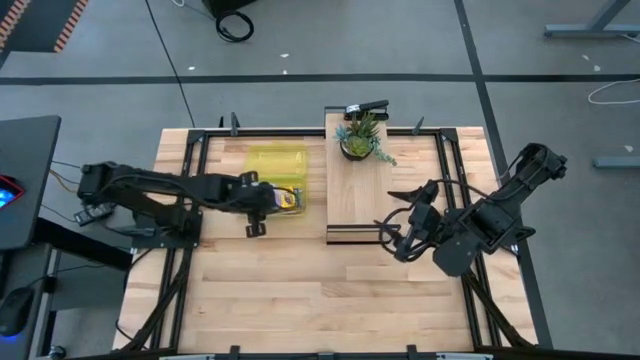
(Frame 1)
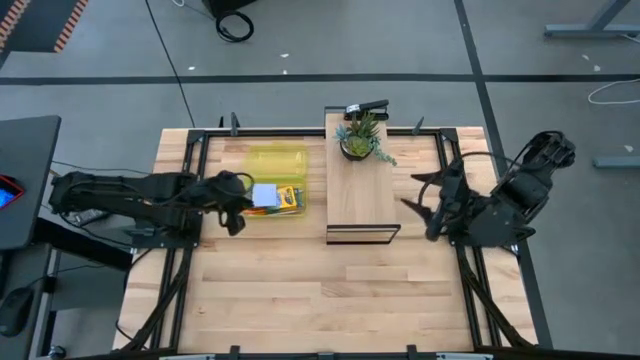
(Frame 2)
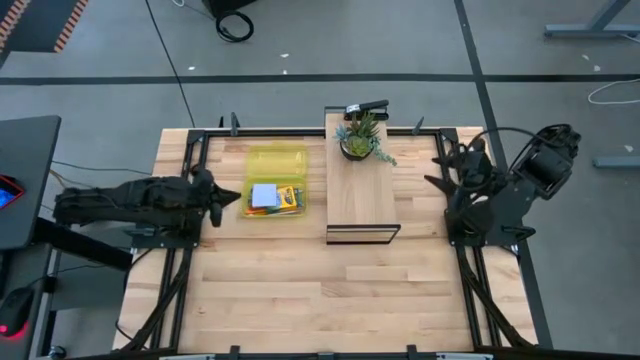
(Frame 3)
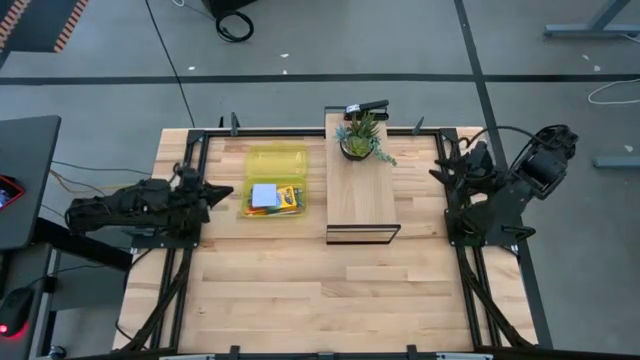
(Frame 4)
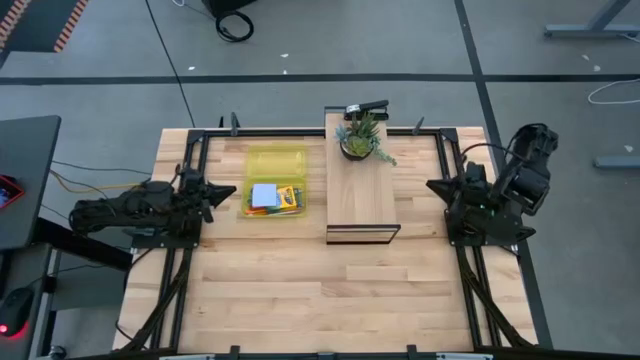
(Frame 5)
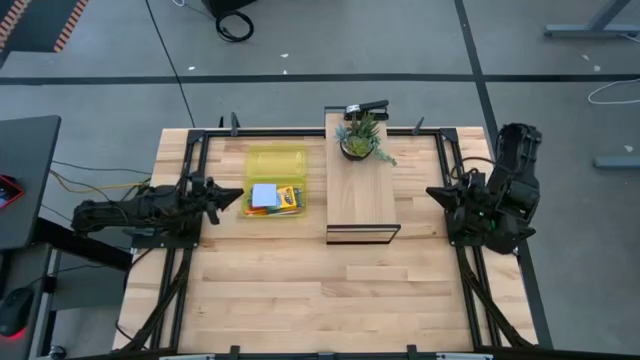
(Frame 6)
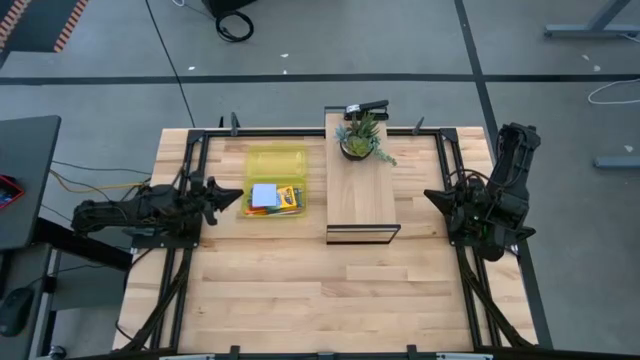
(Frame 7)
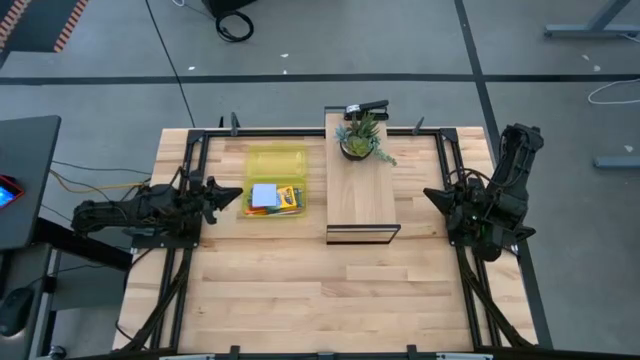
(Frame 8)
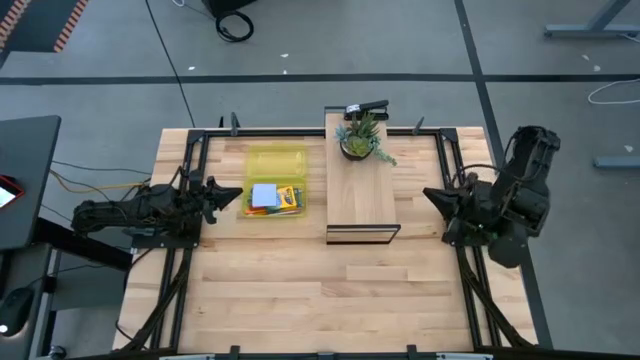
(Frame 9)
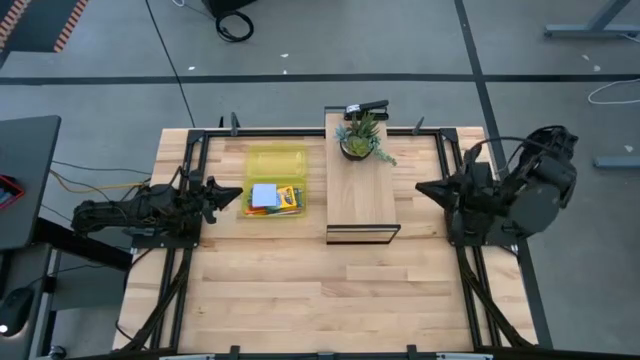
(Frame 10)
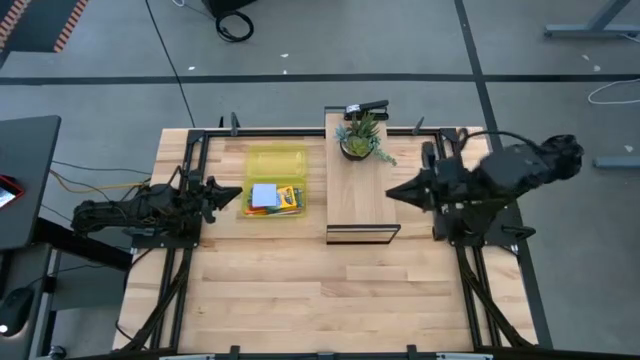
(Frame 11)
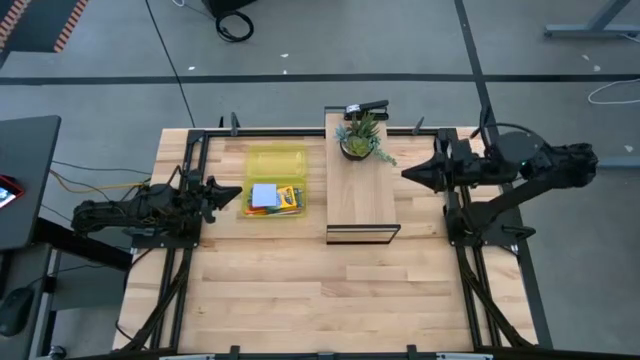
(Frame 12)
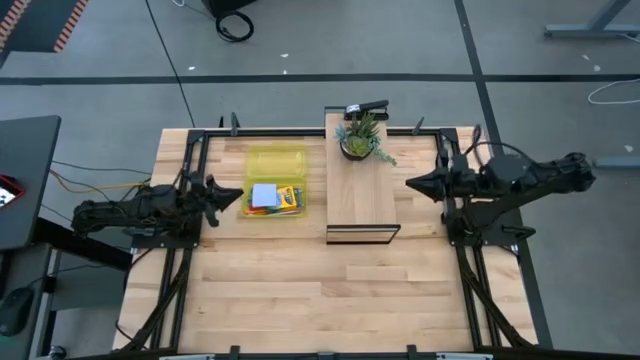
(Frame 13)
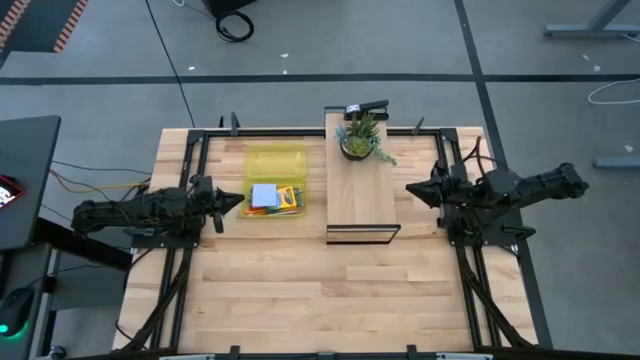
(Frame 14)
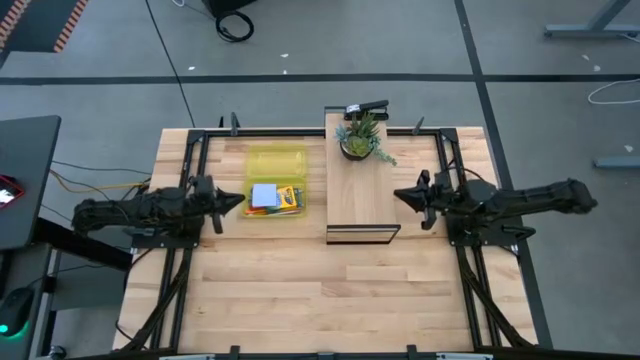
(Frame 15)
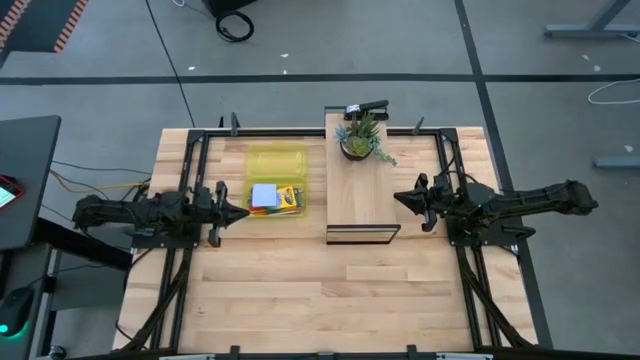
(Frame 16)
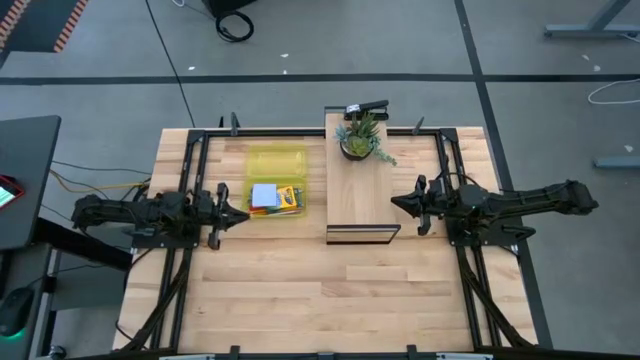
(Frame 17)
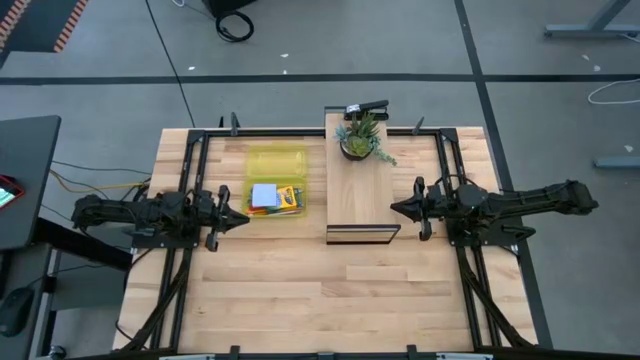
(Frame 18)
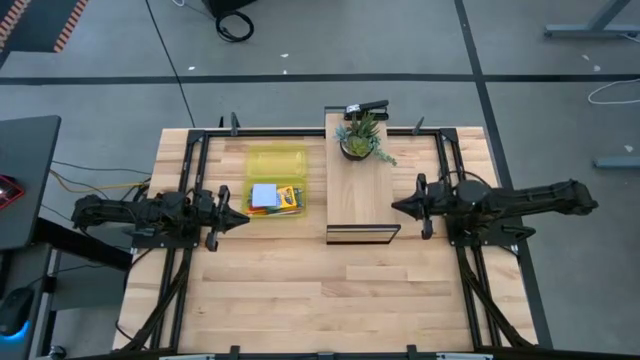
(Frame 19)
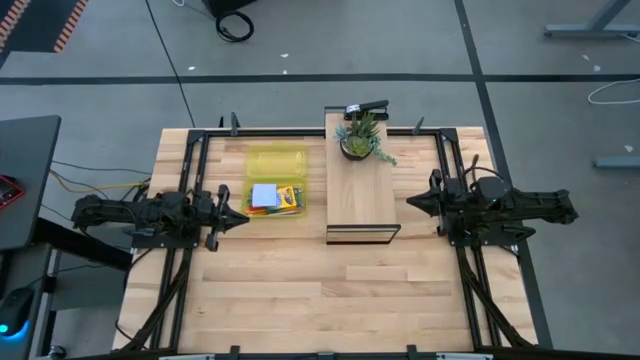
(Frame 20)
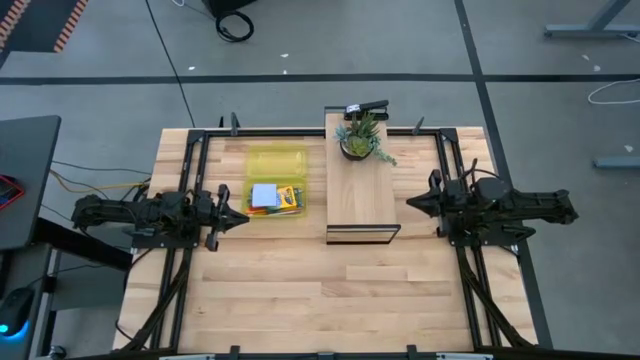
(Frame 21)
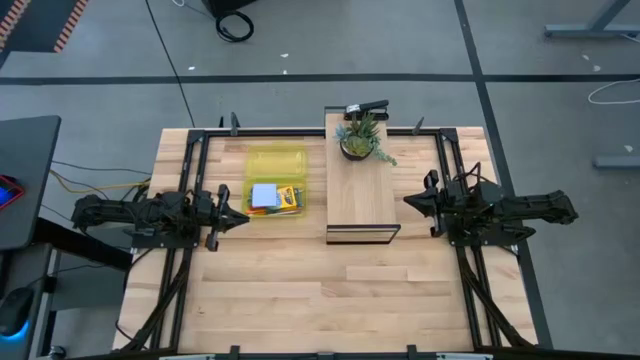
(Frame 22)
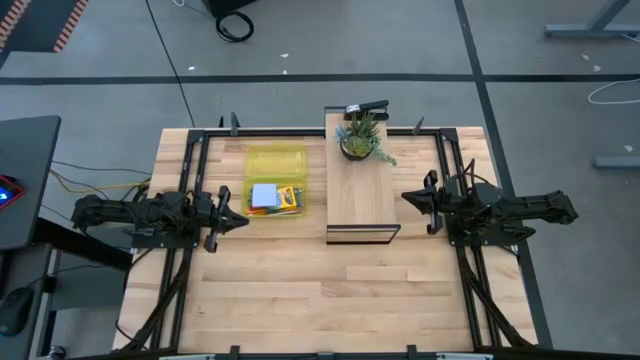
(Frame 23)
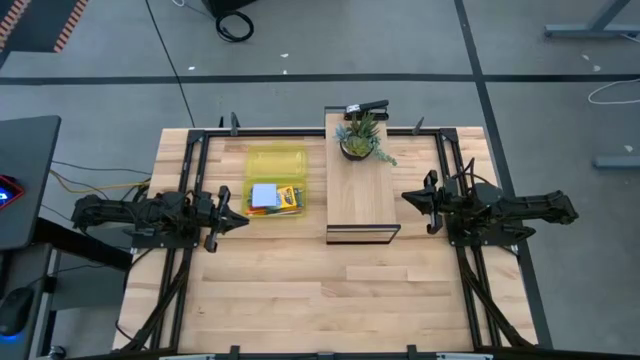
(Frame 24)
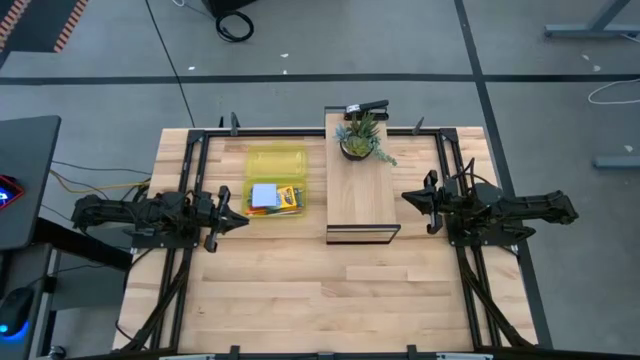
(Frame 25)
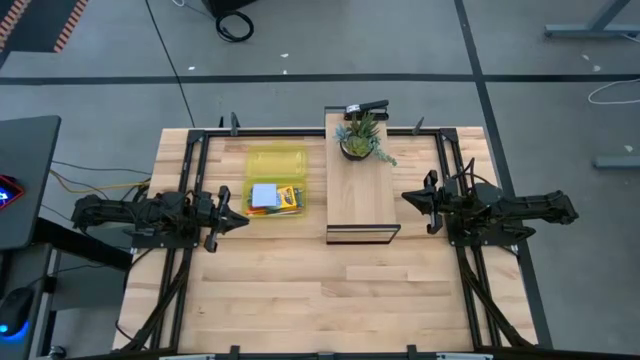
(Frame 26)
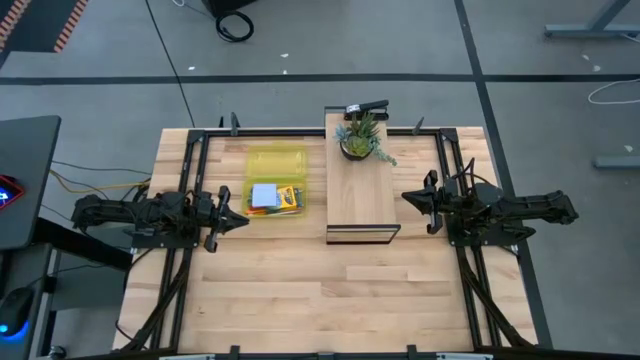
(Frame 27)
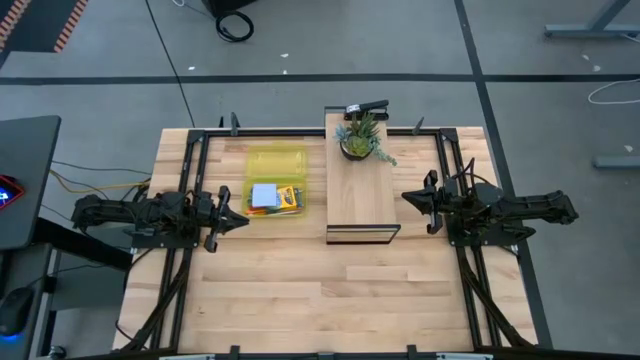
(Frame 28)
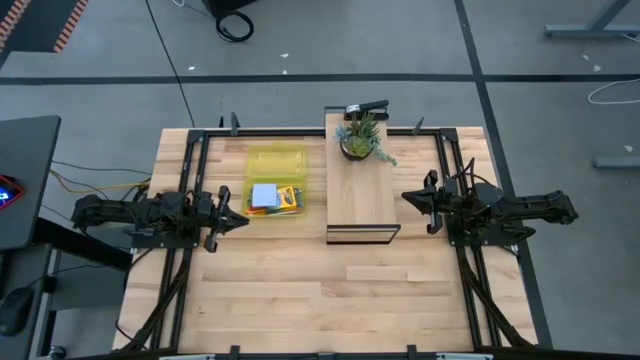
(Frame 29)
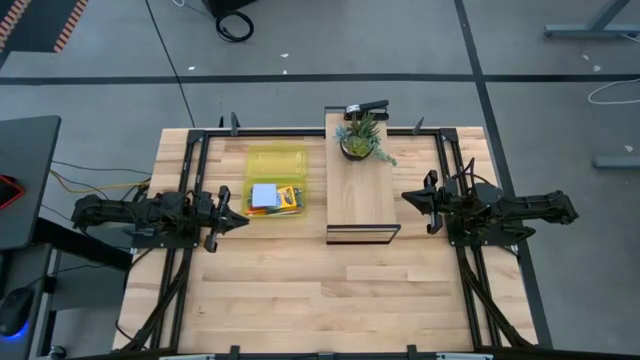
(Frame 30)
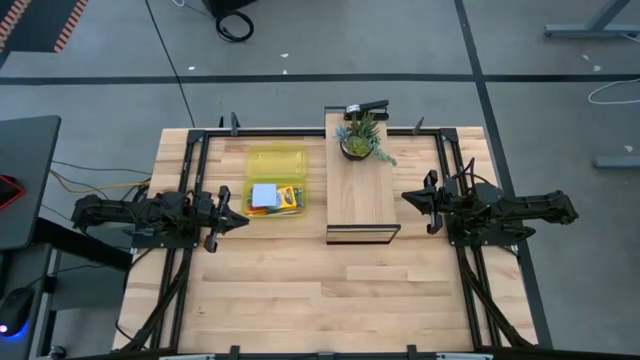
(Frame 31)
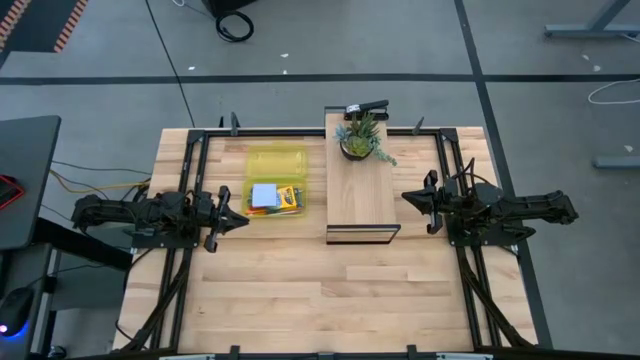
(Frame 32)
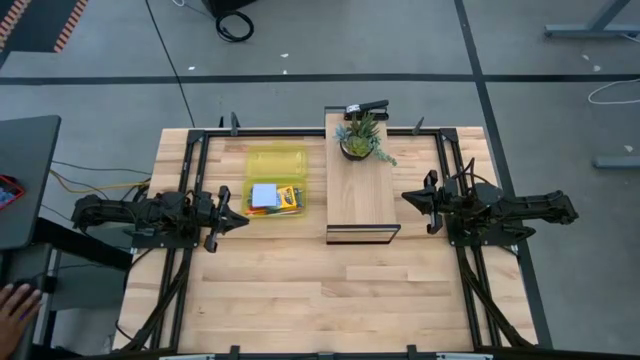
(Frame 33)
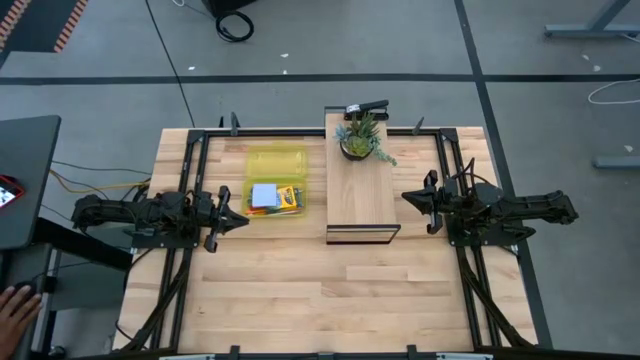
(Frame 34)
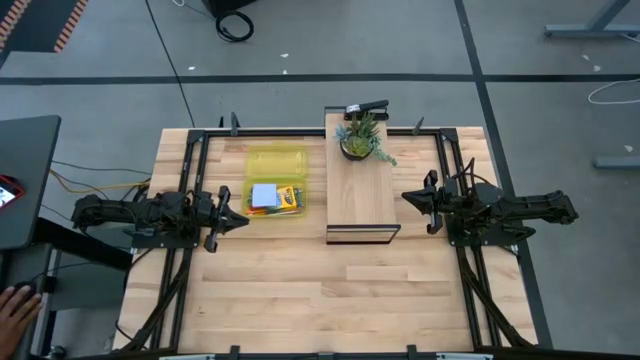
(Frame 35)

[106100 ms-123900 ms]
Task: Pack school essentials
Return to Home Position

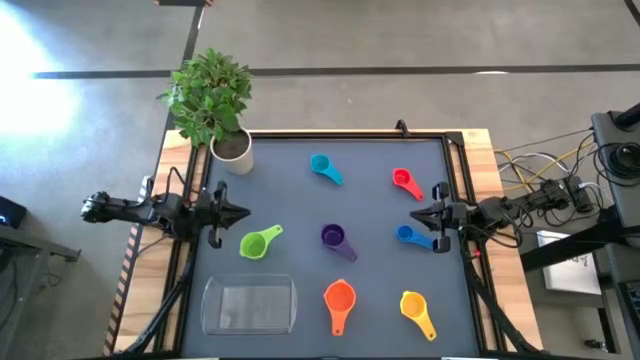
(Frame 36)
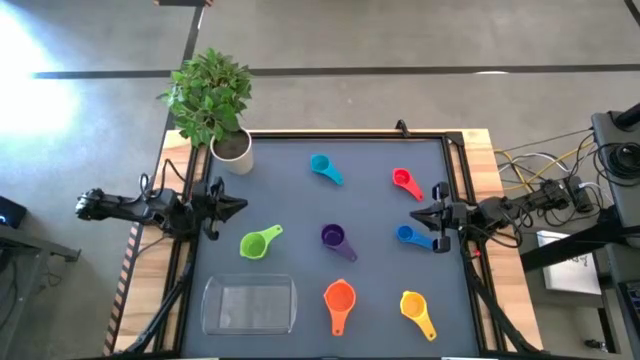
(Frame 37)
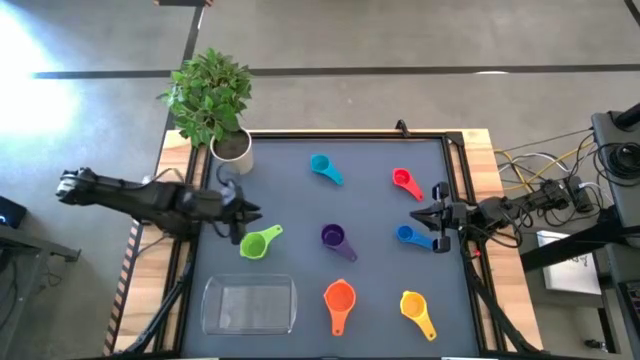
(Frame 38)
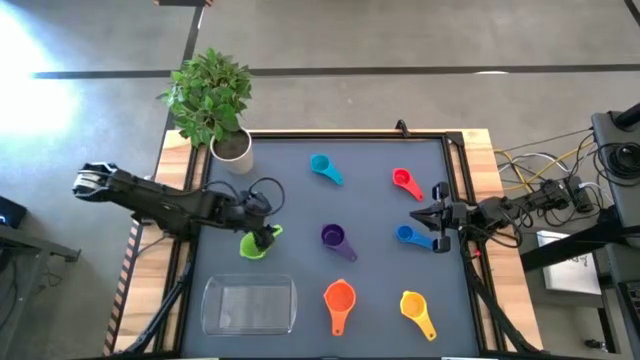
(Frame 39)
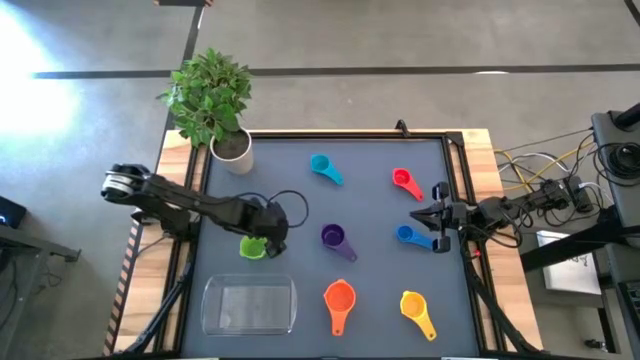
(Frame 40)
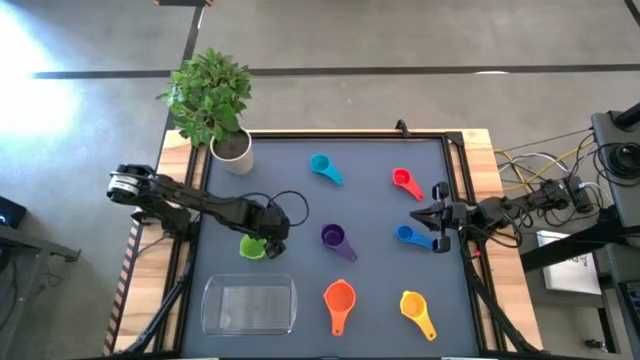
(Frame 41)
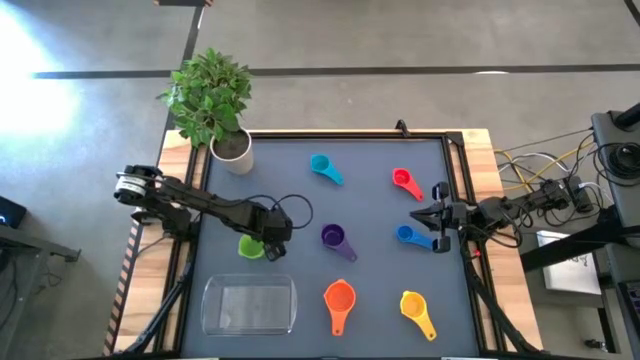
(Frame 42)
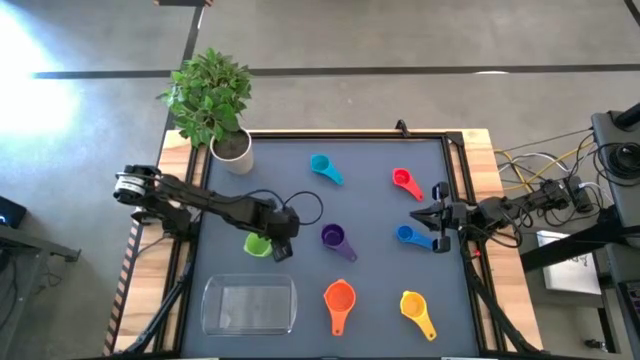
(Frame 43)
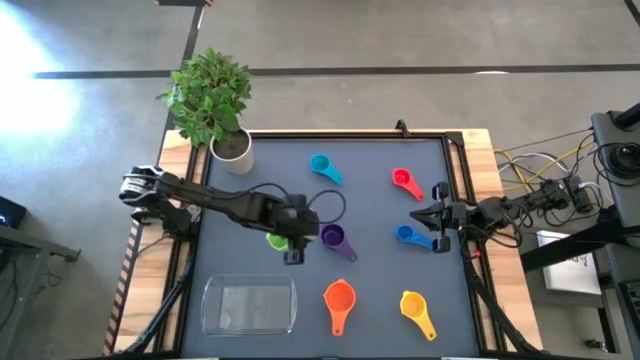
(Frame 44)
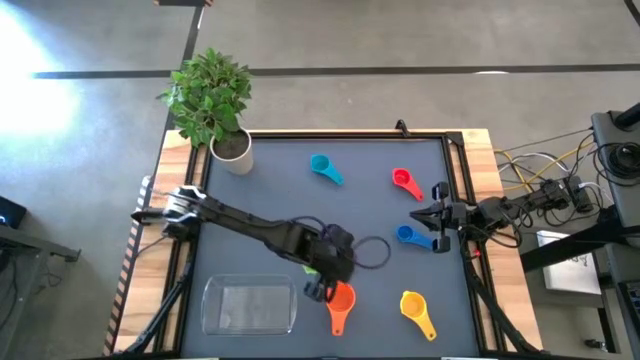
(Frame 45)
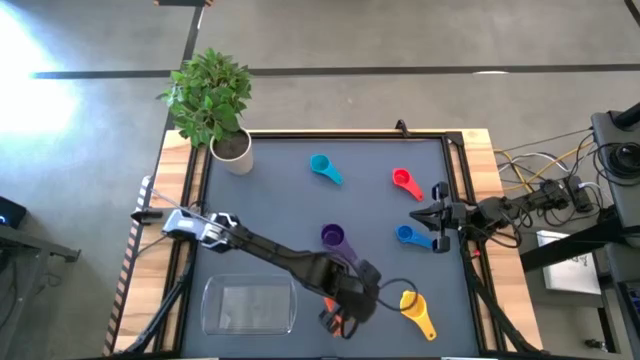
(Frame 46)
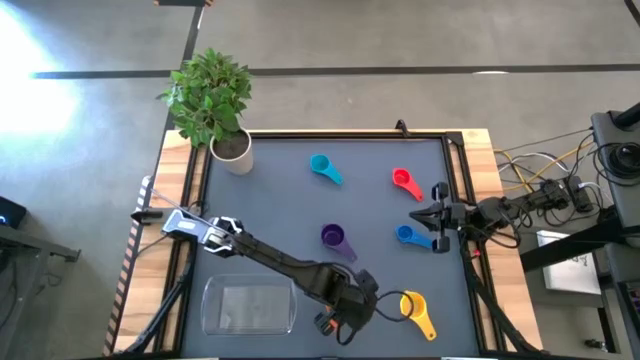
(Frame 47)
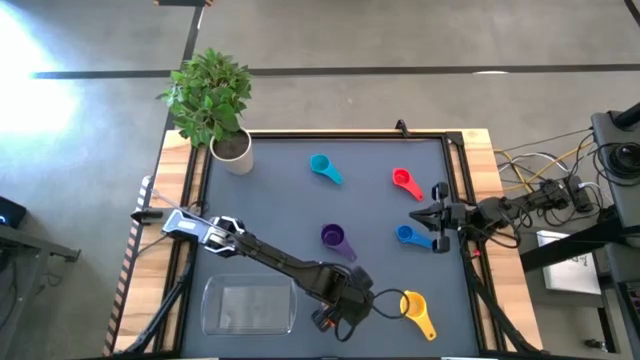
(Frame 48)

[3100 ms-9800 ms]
Task: Nest measuring cups in basket
Stack the green measuring cup on top of the orange measuring cup
